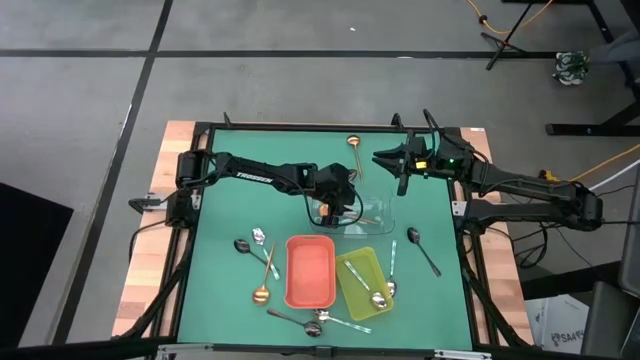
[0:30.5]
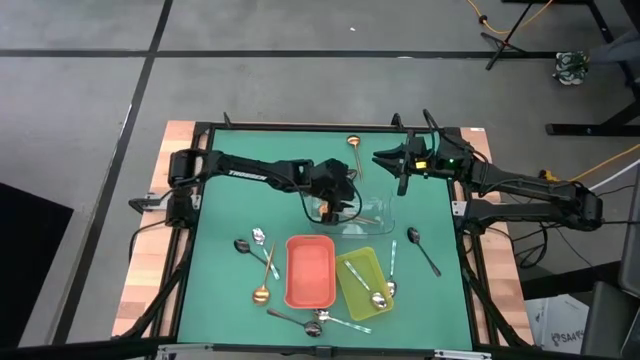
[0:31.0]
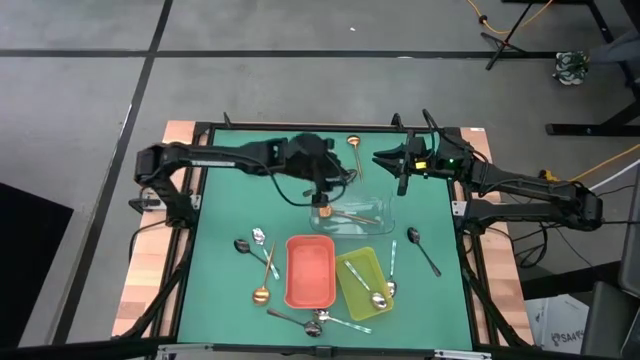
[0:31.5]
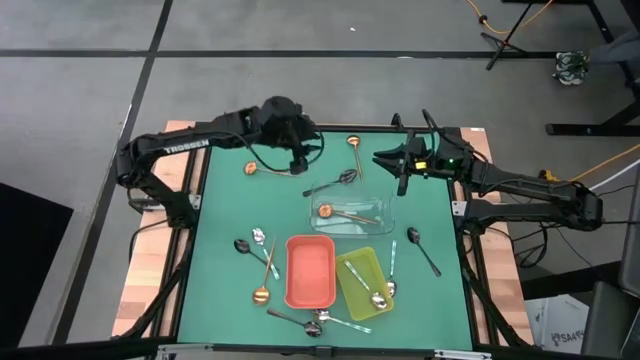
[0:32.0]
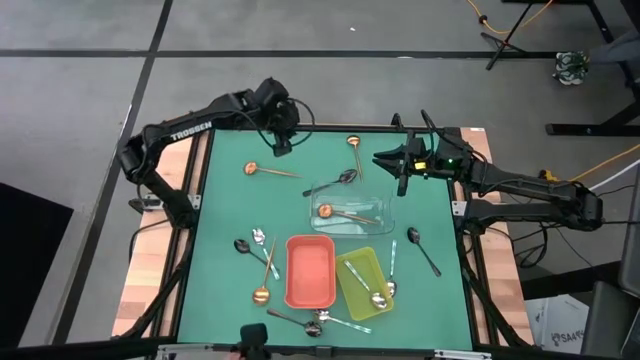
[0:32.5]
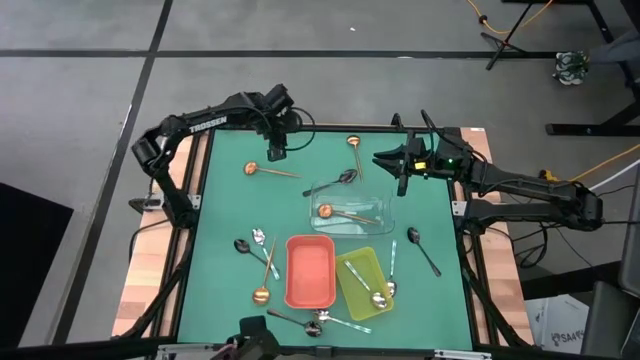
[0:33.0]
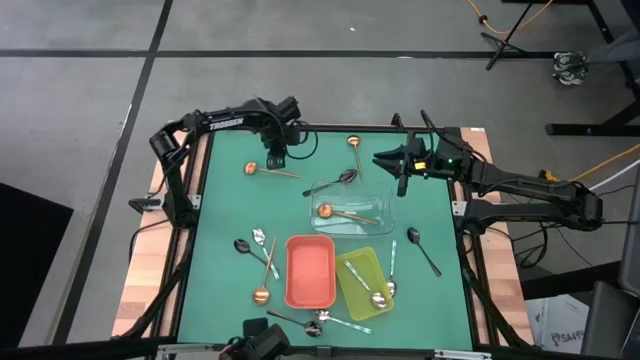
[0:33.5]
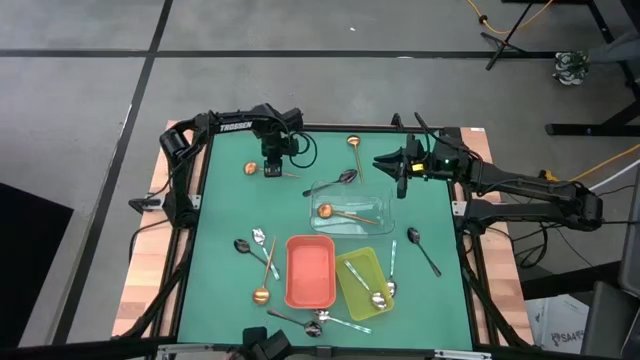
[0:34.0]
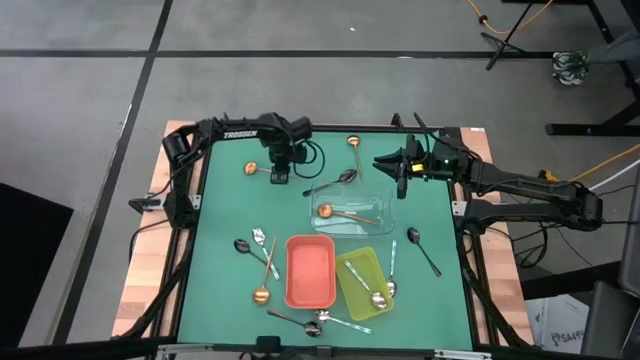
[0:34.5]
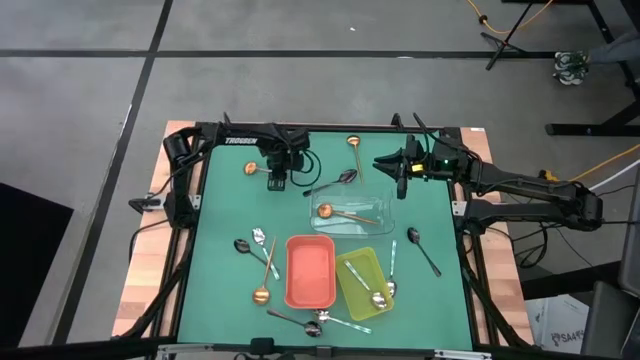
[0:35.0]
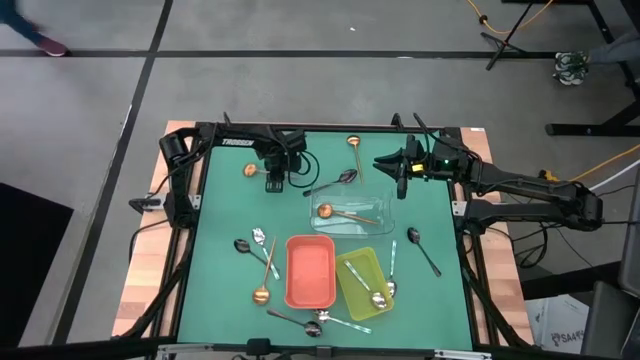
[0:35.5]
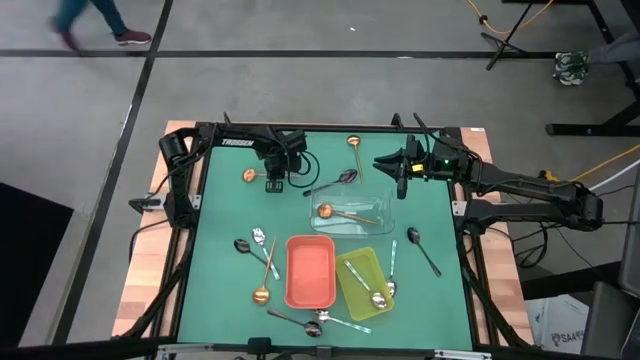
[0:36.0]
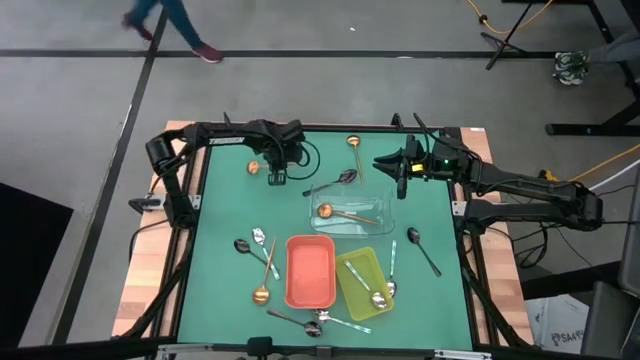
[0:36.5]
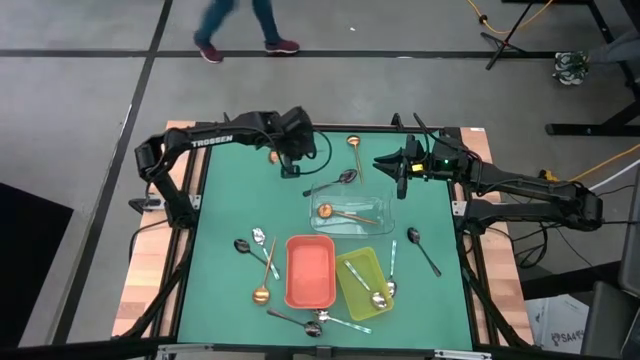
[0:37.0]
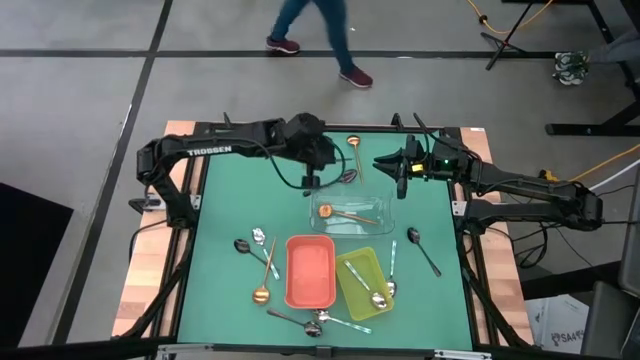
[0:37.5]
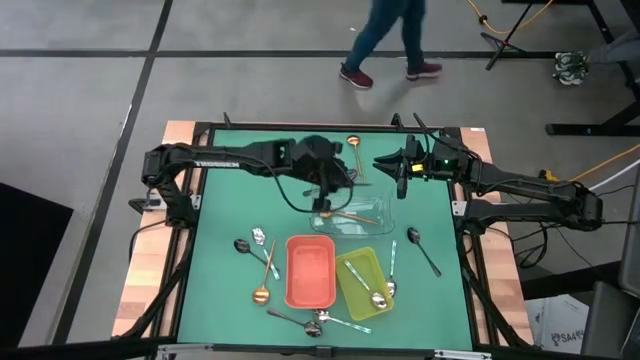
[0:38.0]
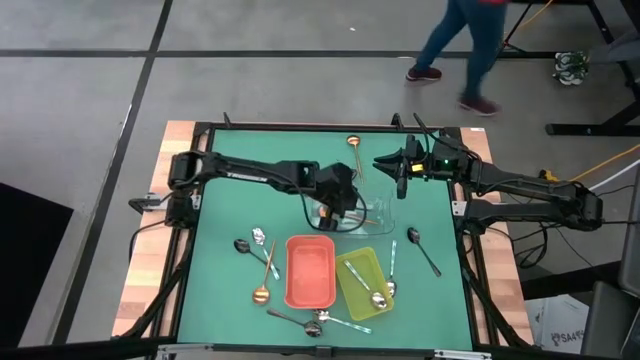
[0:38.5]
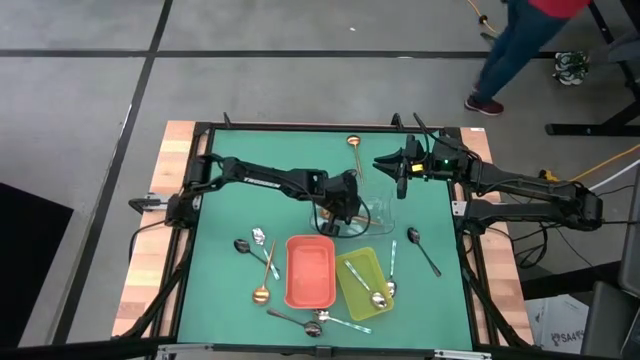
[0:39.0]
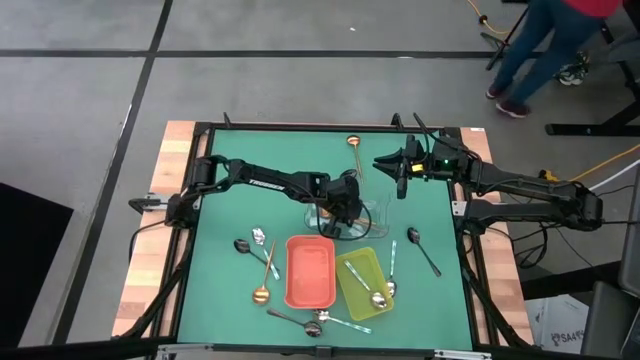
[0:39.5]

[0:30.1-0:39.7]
Task: Sort silverware by color (type)
Put the gold spoon into the transparent bin

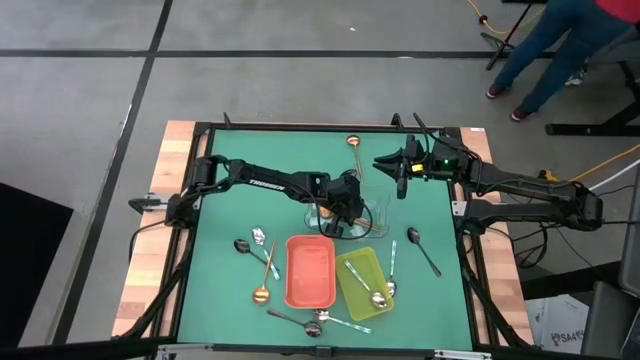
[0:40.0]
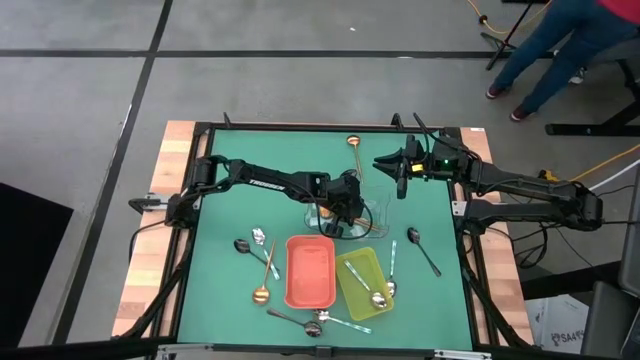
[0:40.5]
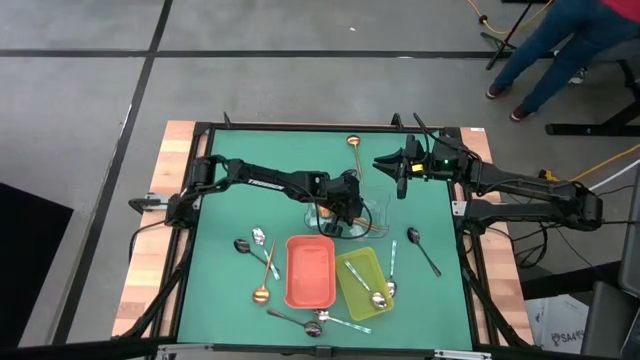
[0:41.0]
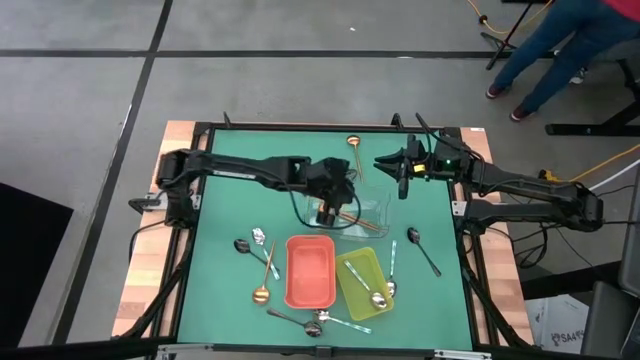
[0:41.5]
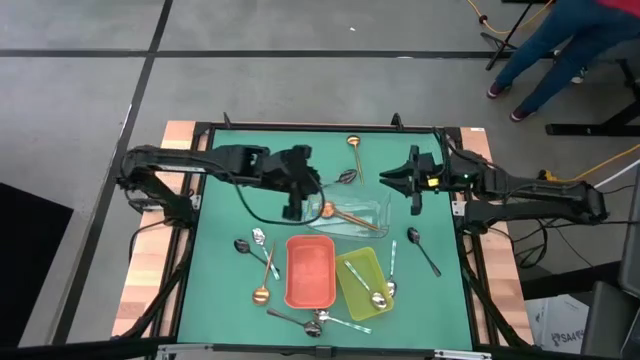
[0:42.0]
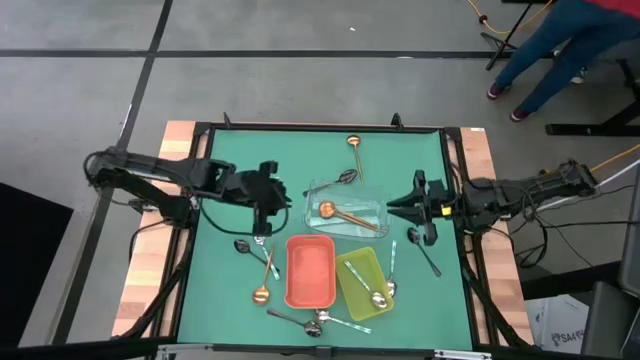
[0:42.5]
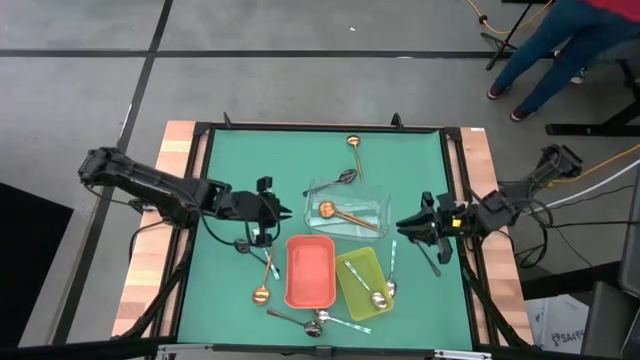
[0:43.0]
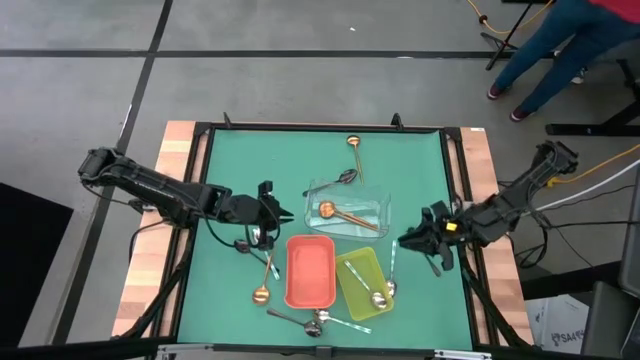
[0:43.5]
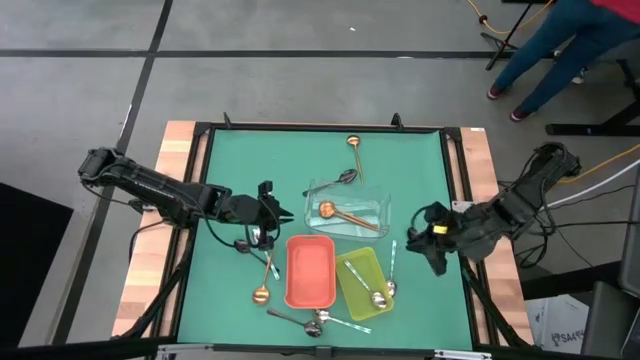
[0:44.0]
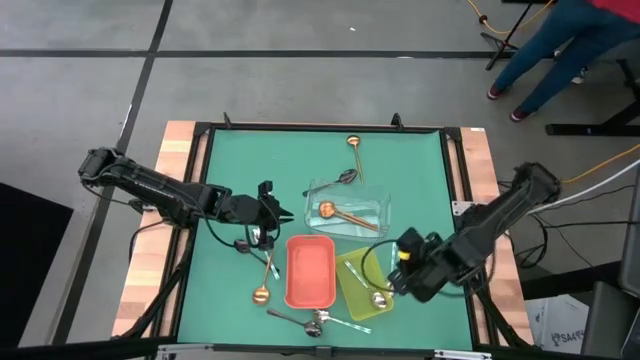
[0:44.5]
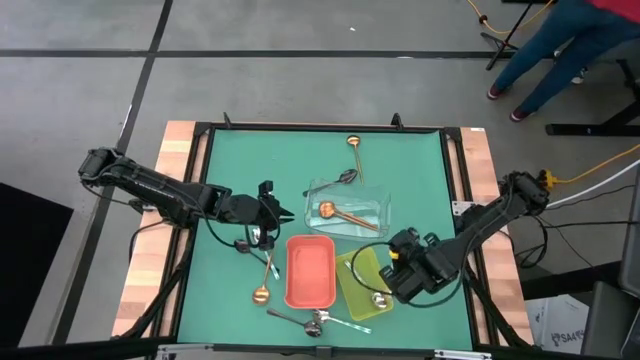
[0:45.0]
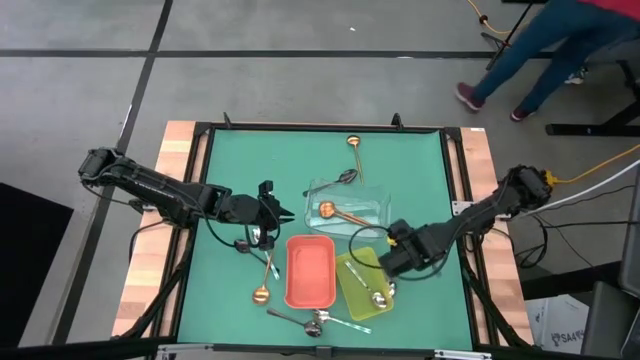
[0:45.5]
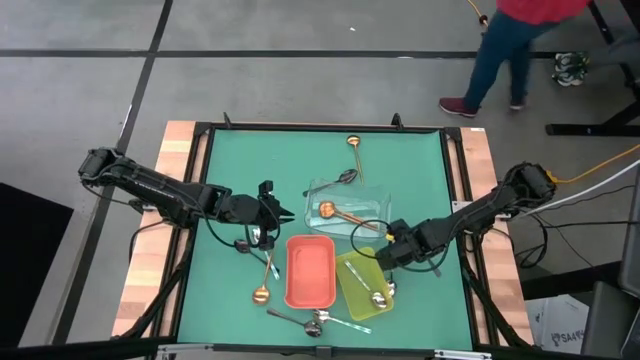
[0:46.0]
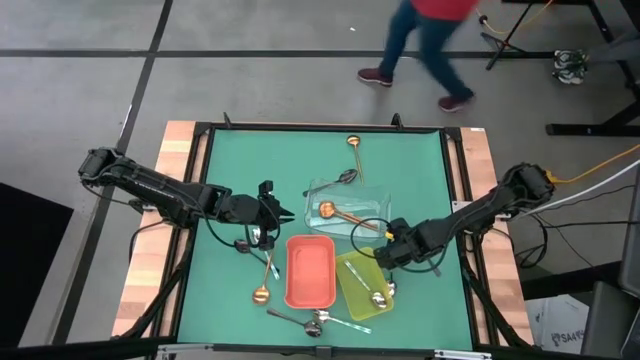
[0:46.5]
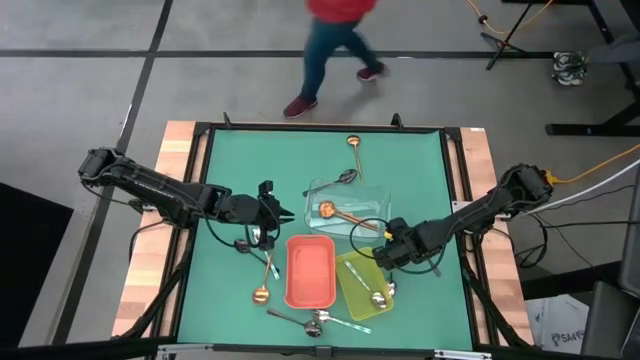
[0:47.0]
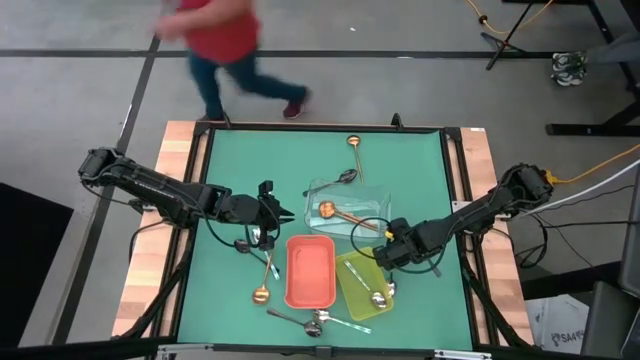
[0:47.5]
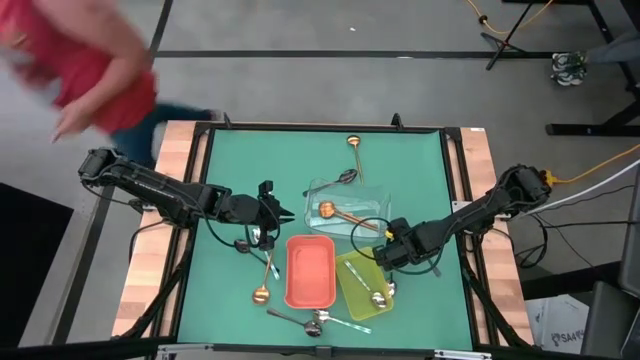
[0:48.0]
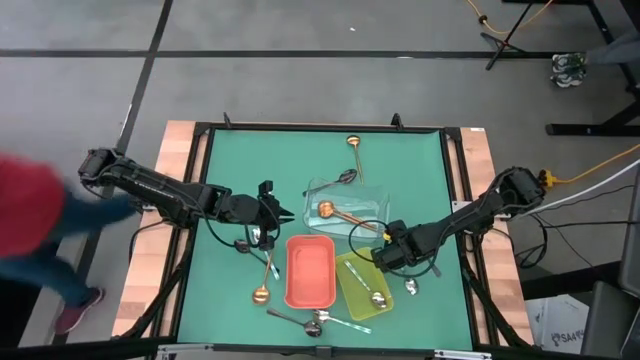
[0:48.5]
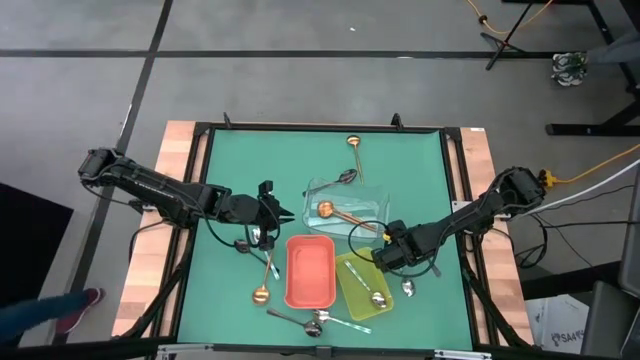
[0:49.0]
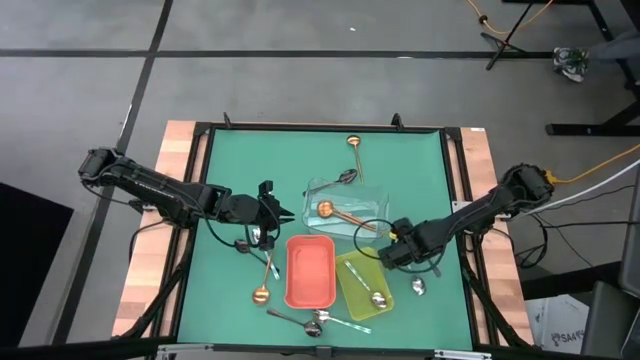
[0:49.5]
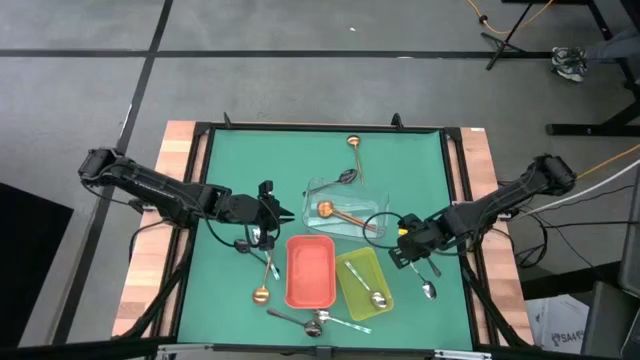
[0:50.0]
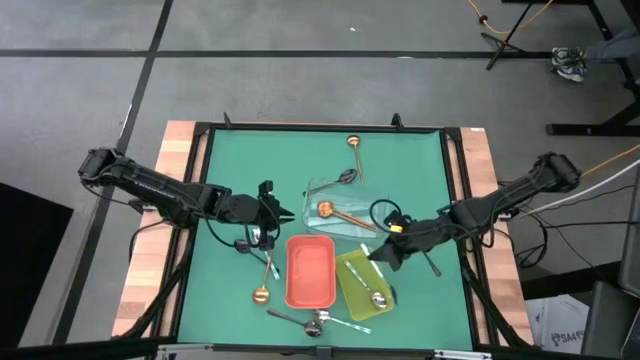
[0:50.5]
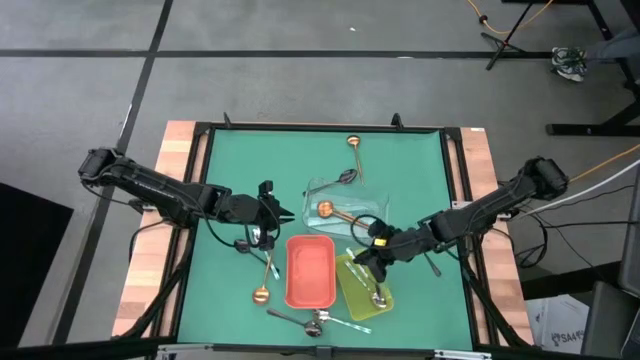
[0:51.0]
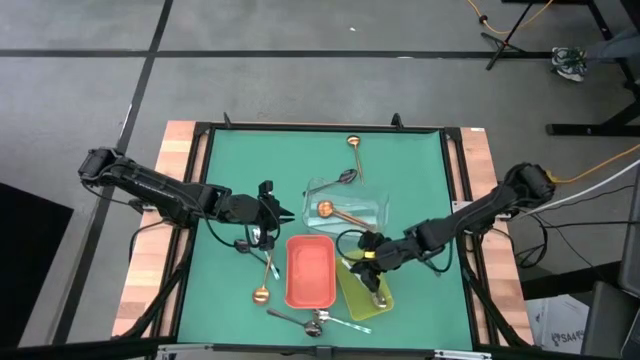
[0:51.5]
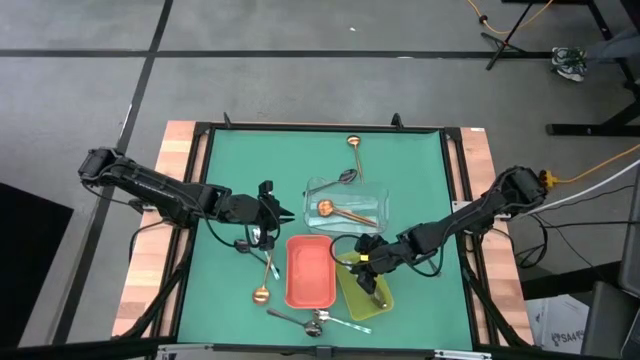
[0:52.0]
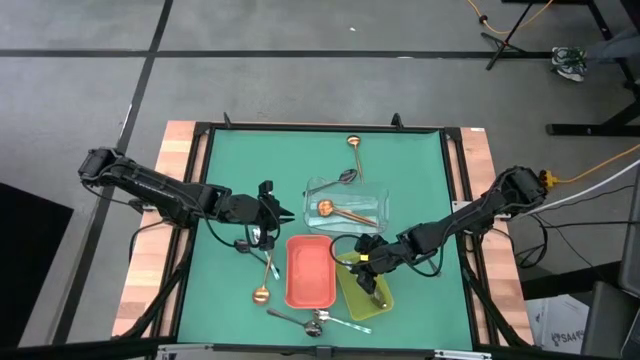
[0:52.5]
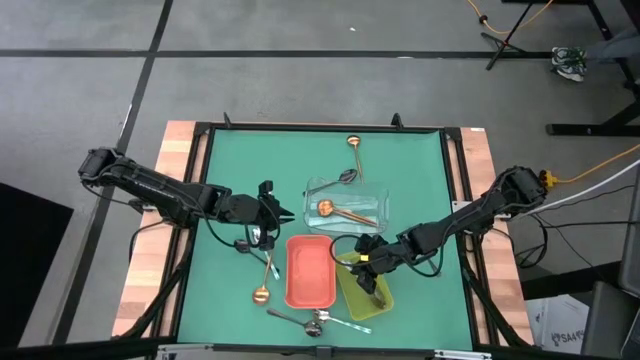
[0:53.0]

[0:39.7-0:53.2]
Put the blue patterned spoon into the yellow bin
